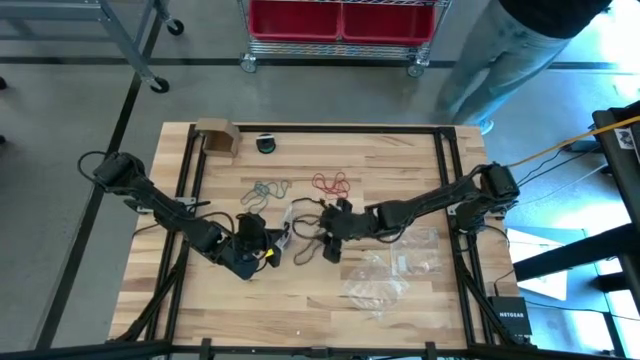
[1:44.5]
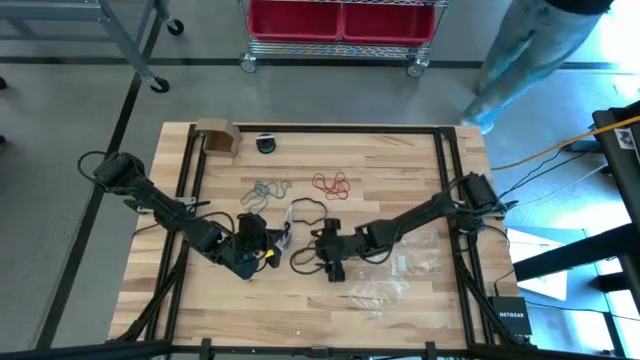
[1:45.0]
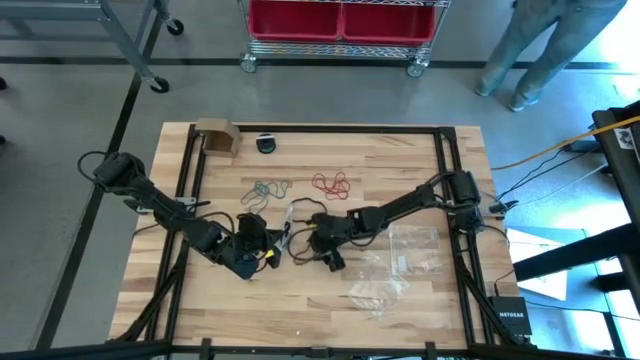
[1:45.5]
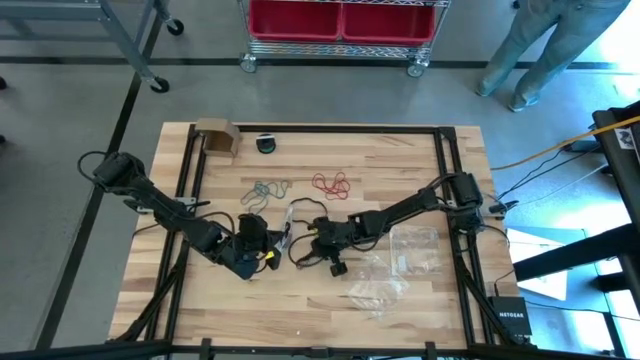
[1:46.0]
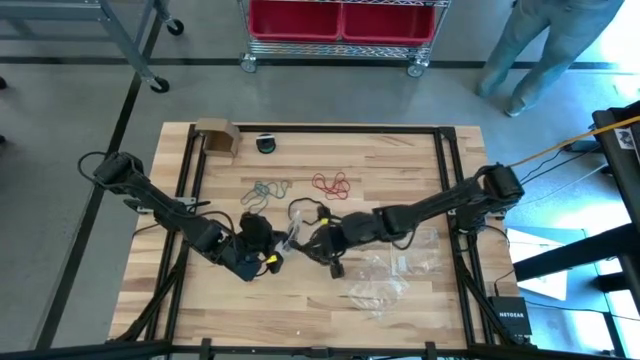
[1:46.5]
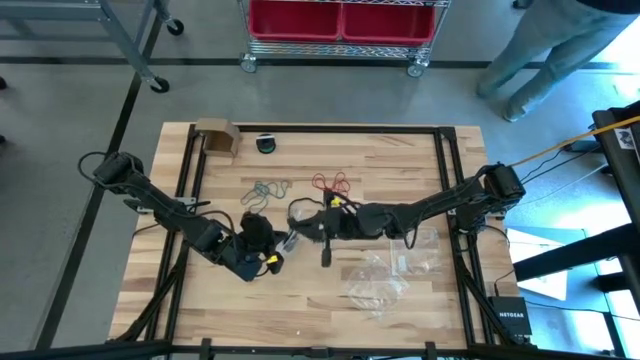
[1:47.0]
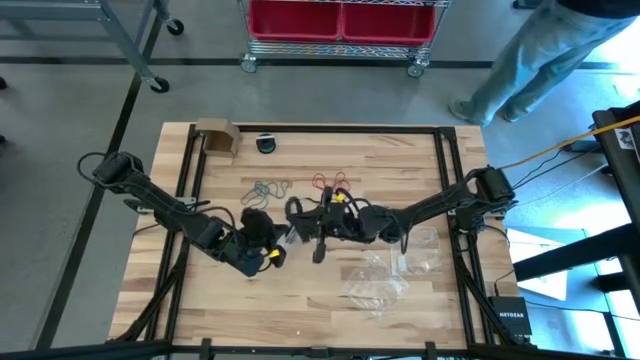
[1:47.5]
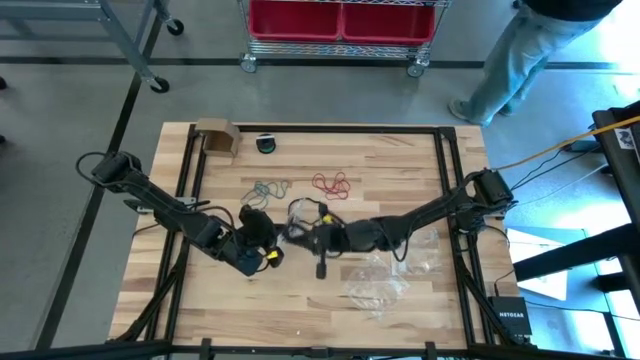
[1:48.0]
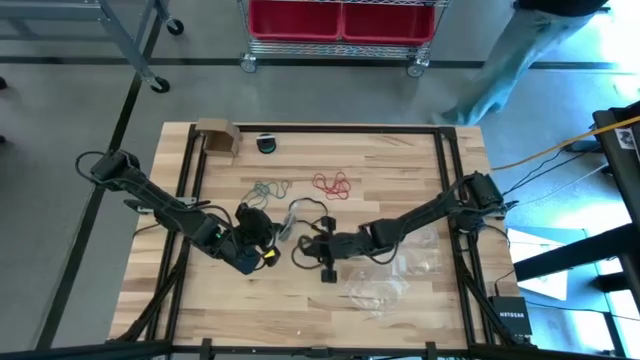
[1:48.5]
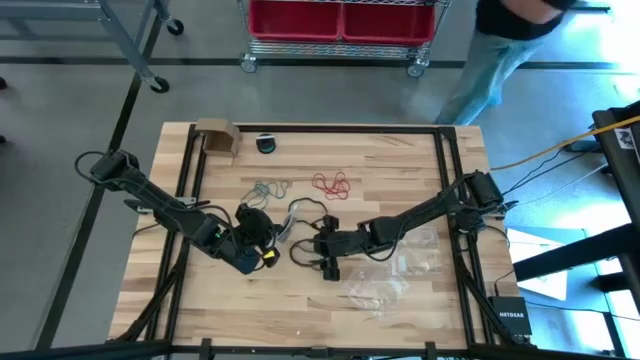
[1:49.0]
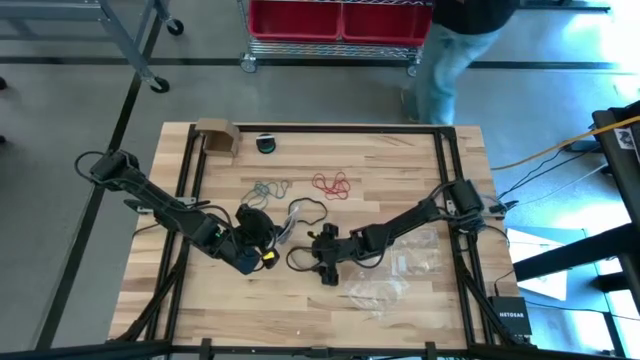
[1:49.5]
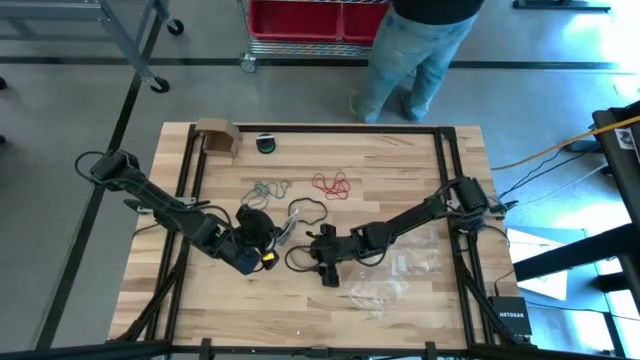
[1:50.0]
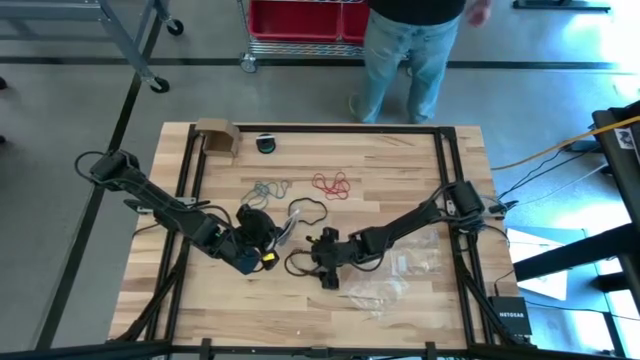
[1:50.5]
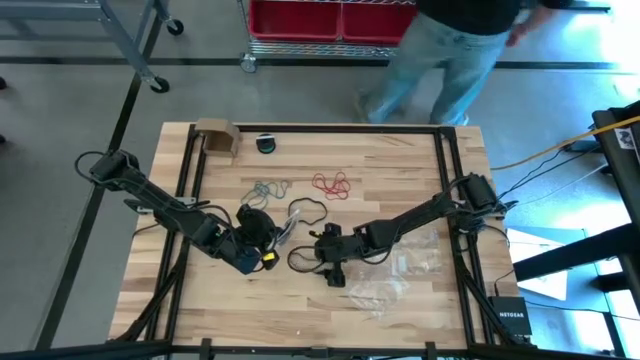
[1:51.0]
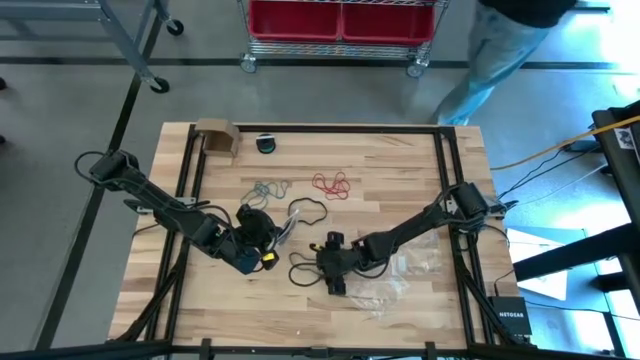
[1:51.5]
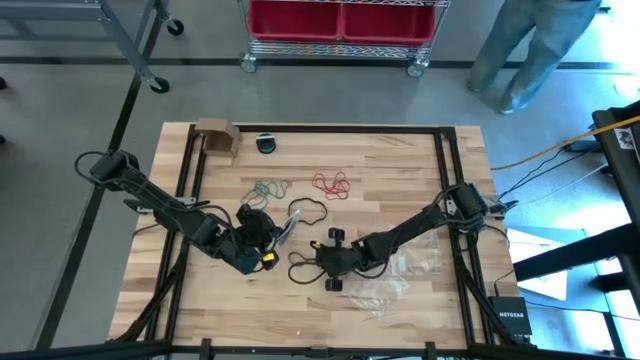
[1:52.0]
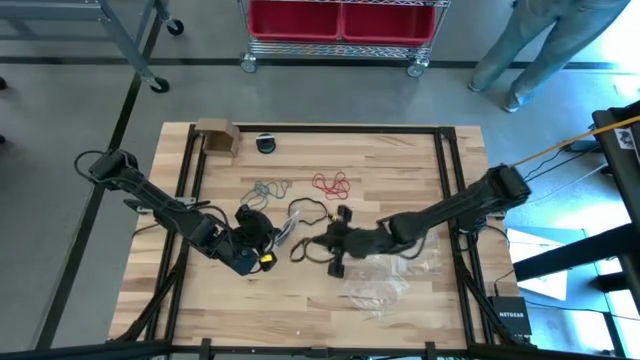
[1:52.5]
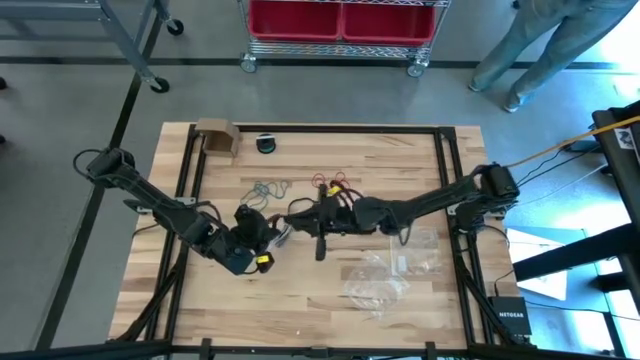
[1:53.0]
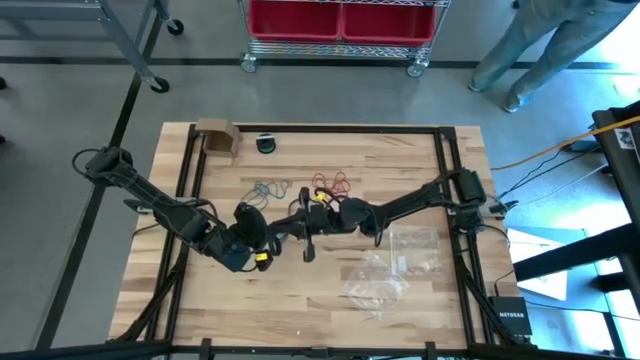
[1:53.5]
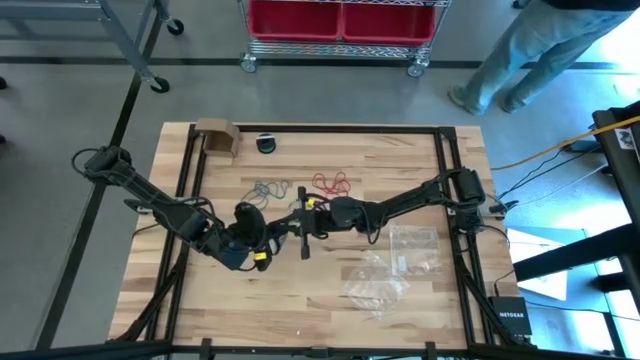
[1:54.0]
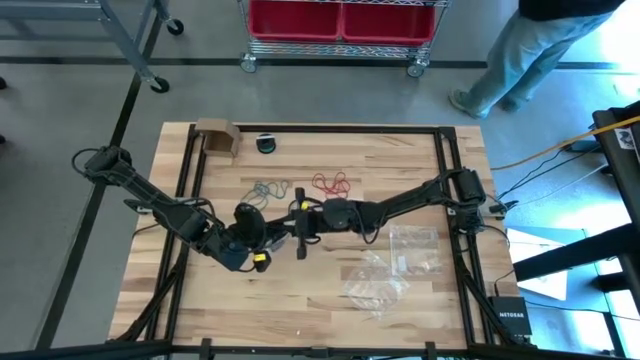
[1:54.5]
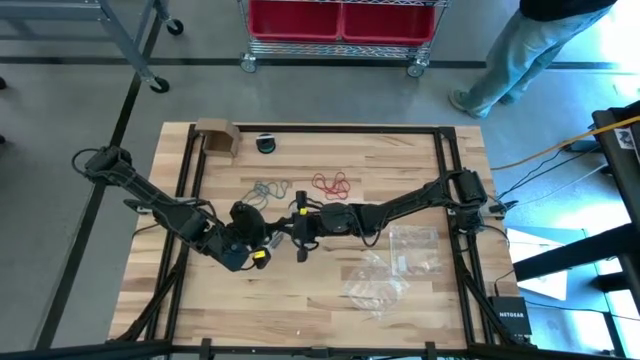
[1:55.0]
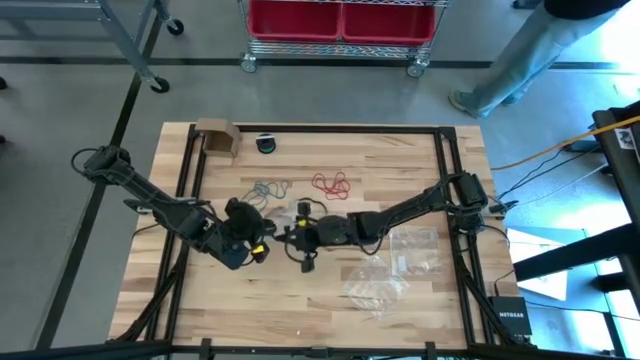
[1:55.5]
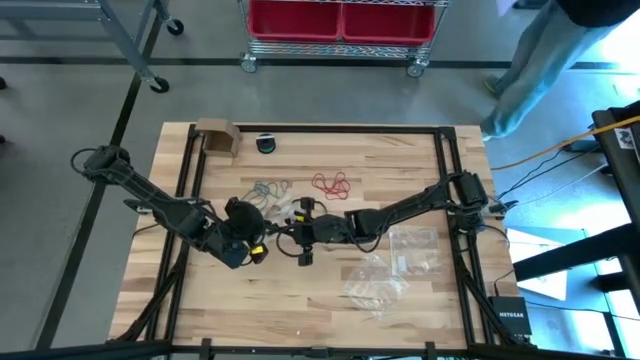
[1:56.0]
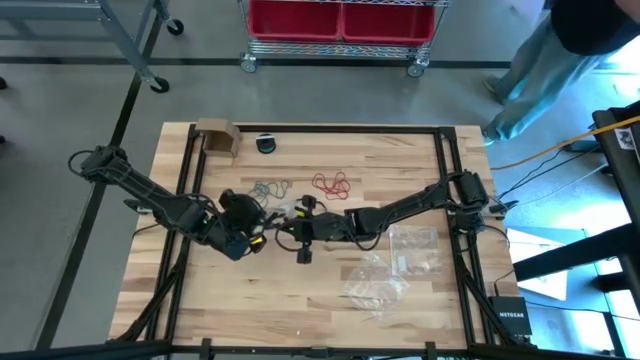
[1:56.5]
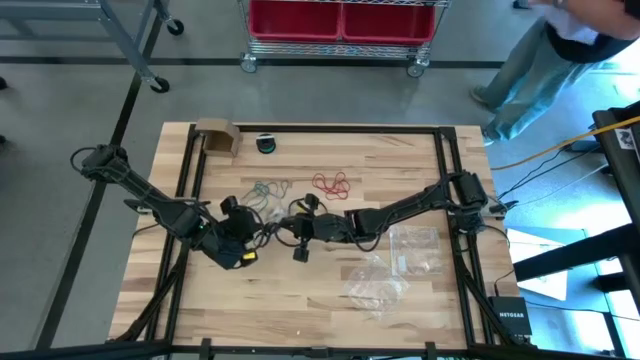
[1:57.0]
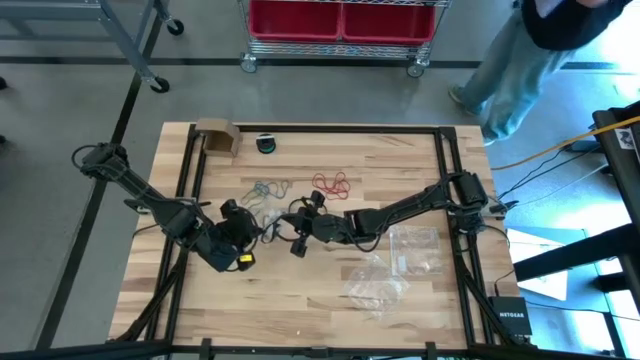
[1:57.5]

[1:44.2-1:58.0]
Task: Sort rubber bands
Put the black rubber band into the transparent zip bag

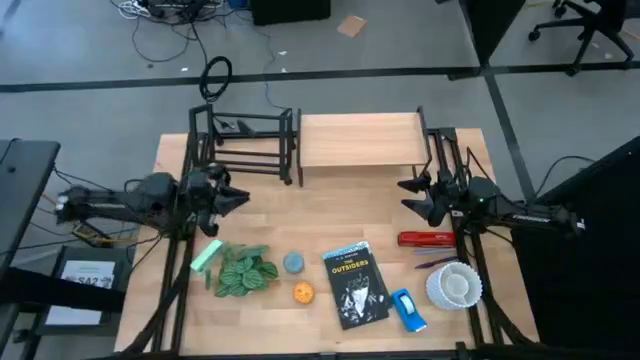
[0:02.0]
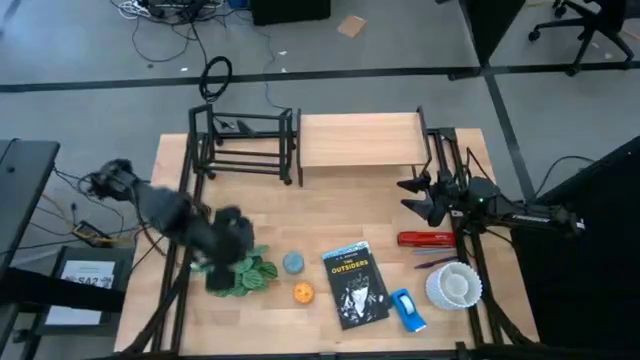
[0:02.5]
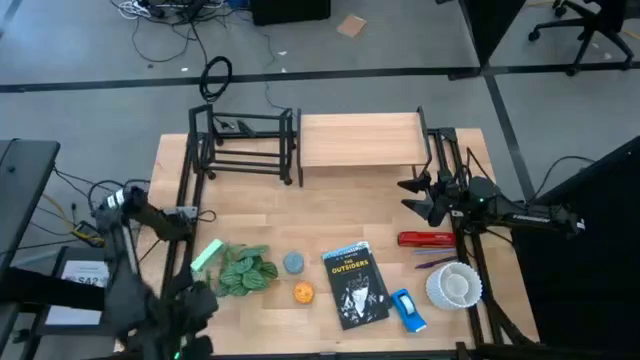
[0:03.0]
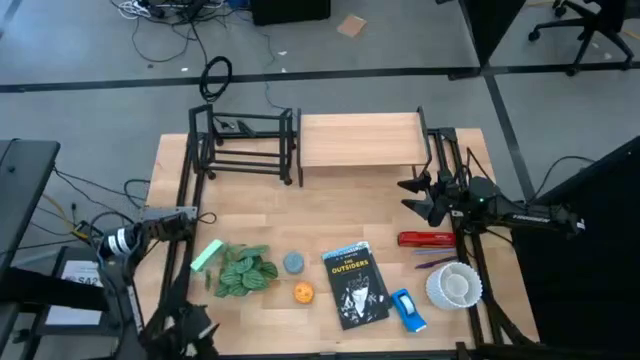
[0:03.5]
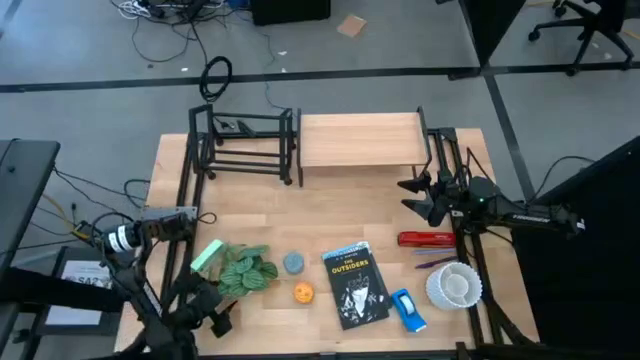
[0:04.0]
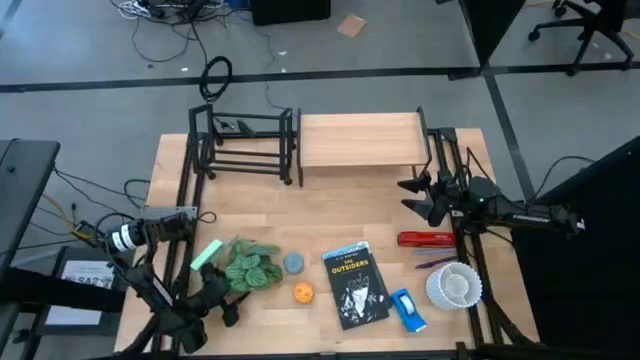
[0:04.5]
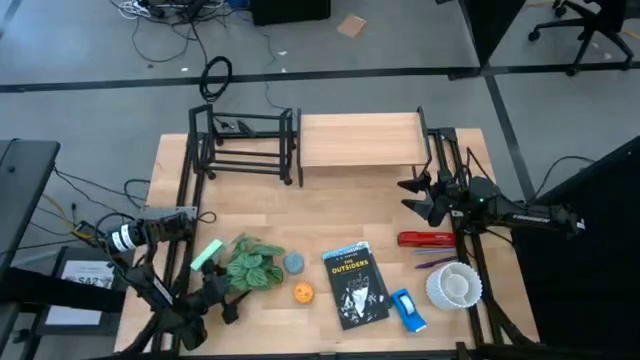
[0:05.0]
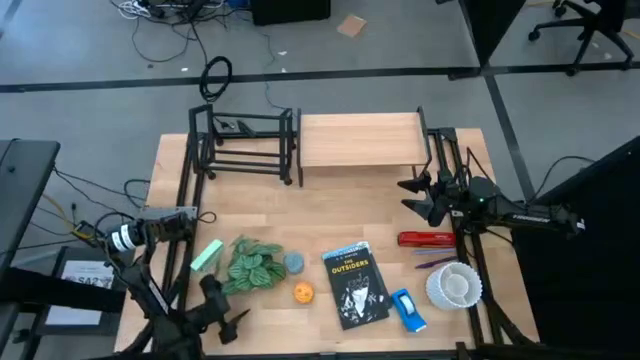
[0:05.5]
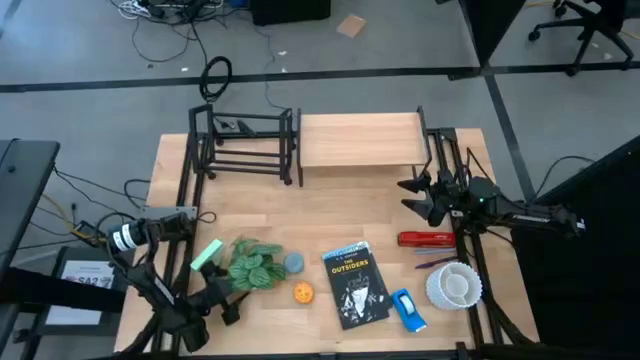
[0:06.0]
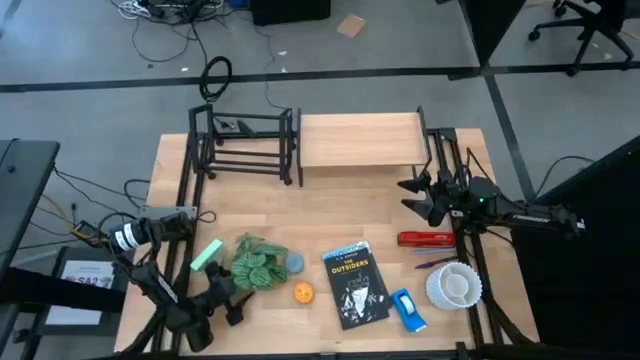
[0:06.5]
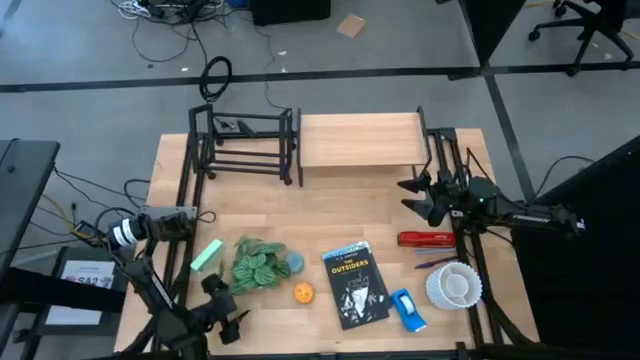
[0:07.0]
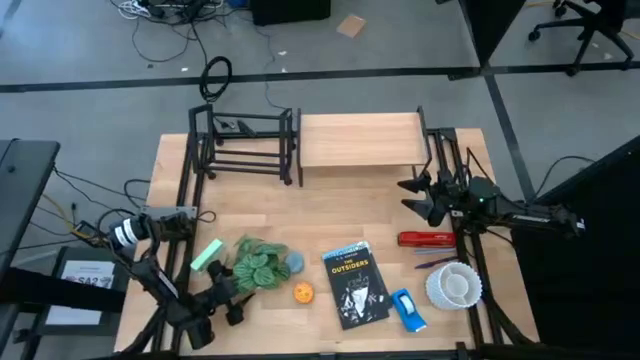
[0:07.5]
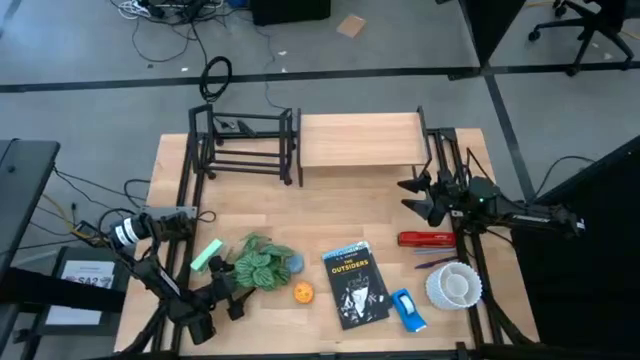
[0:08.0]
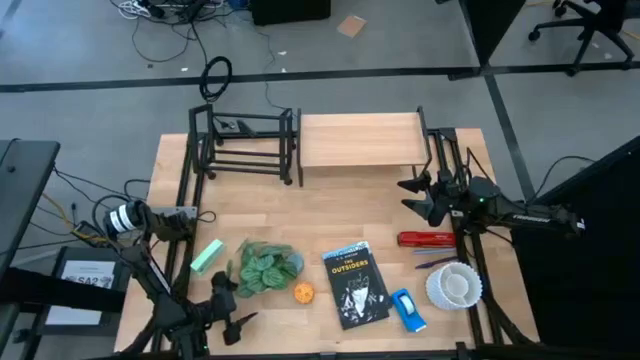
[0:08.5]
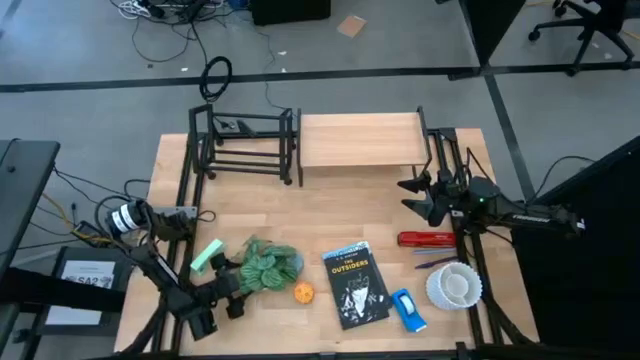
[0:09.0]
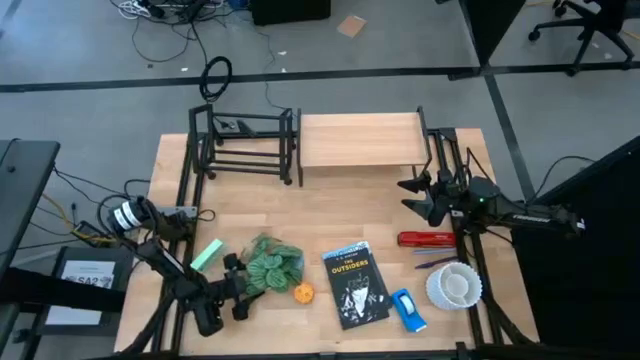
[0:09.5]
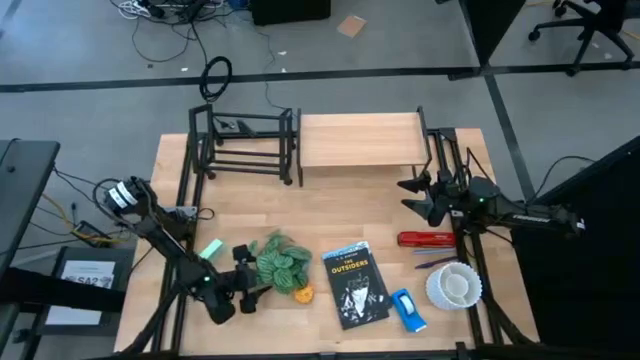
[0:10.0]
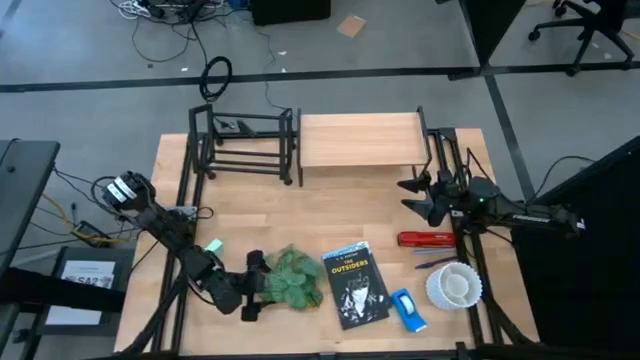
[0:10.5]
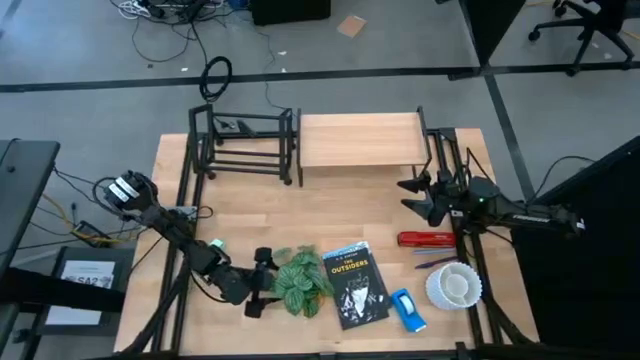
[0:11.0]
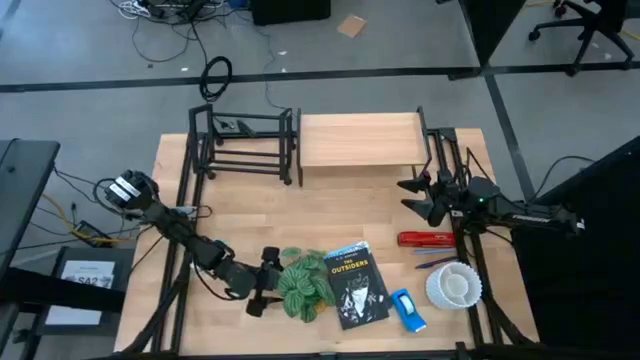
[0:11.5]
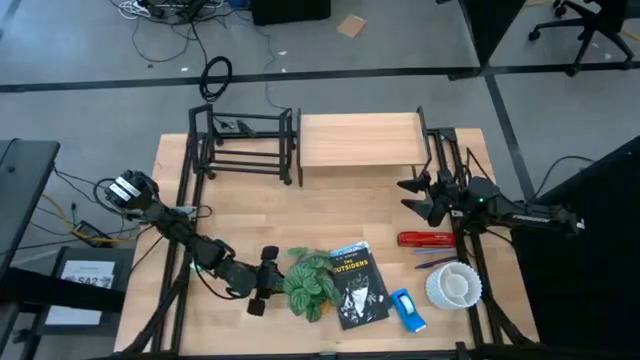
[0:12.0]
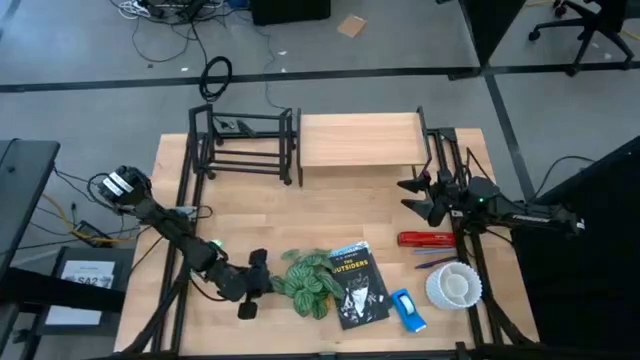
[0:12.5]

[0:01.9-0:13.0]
Task: Stock shelves
Put the flower pot on the shelf
